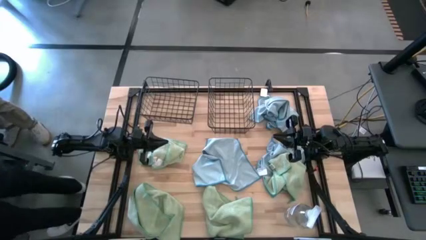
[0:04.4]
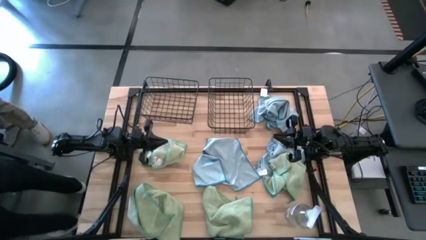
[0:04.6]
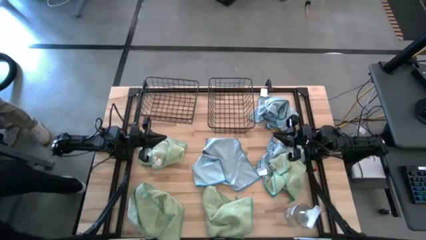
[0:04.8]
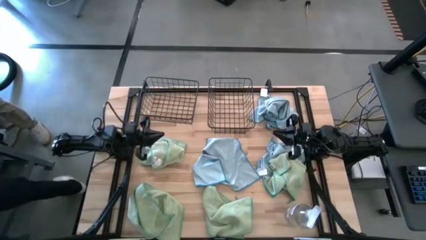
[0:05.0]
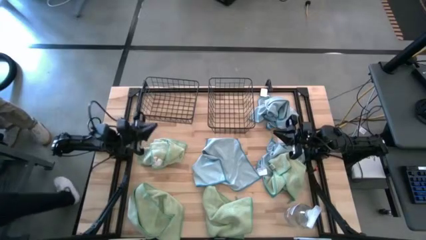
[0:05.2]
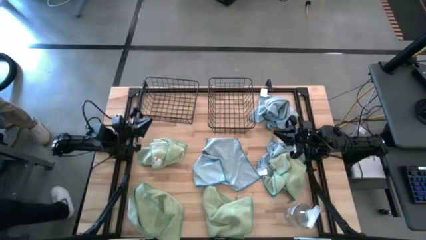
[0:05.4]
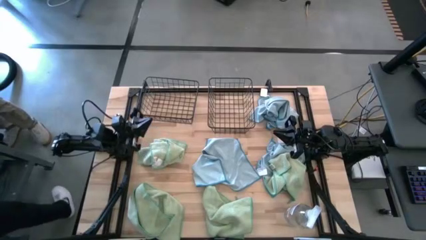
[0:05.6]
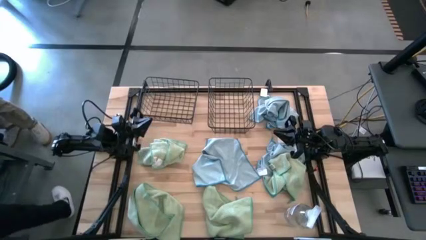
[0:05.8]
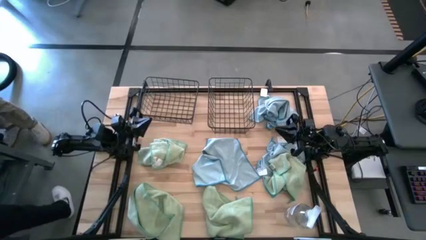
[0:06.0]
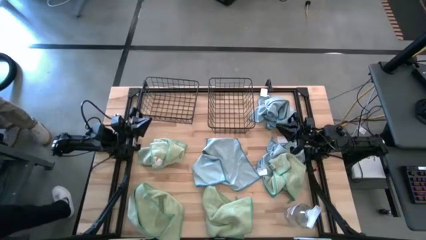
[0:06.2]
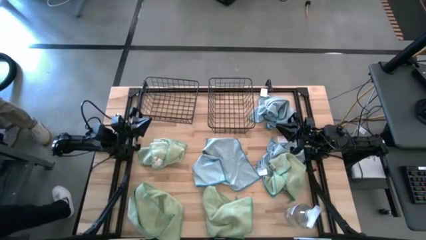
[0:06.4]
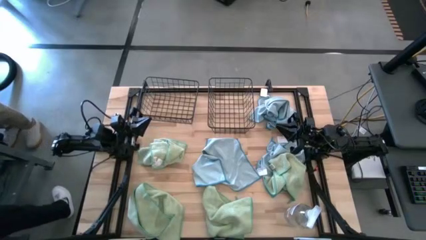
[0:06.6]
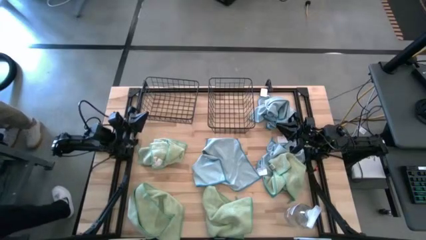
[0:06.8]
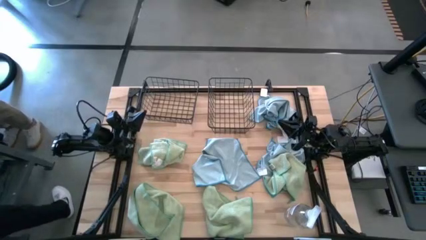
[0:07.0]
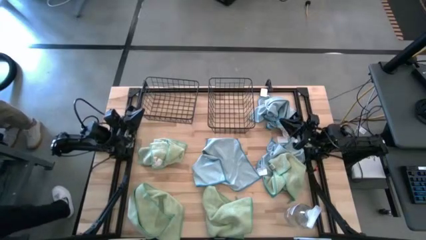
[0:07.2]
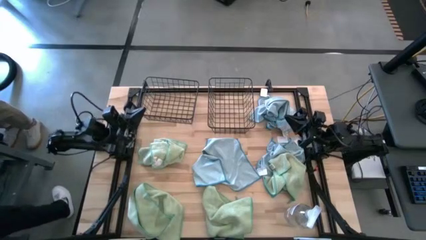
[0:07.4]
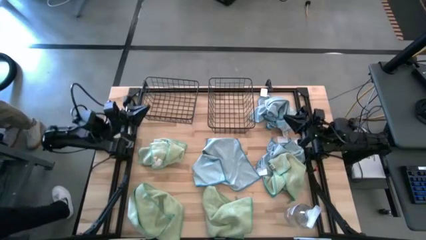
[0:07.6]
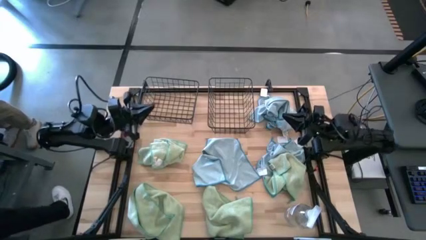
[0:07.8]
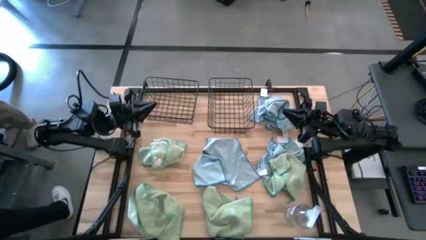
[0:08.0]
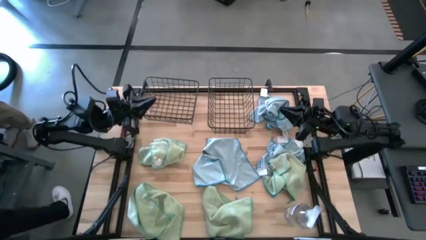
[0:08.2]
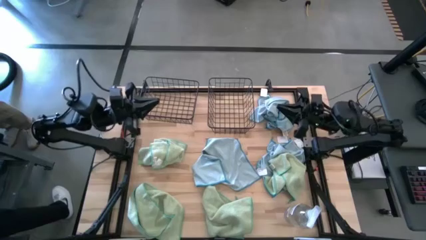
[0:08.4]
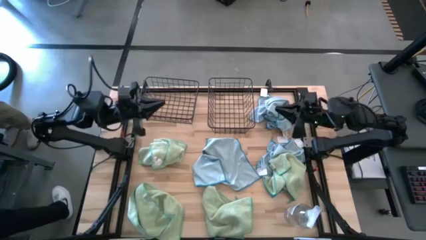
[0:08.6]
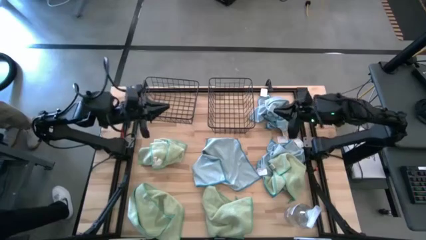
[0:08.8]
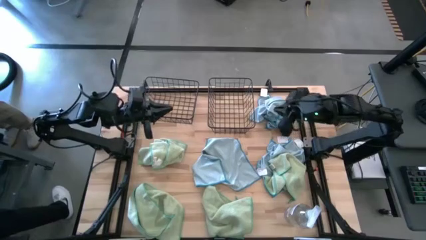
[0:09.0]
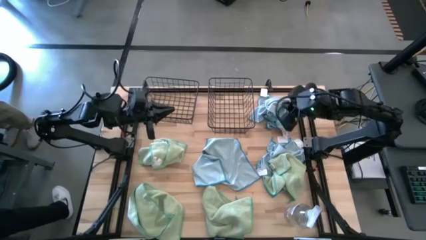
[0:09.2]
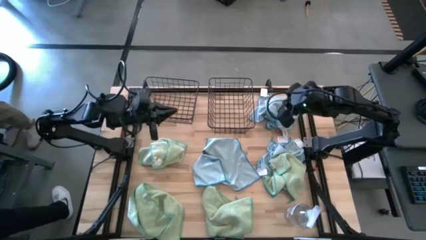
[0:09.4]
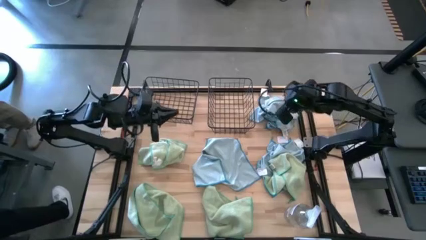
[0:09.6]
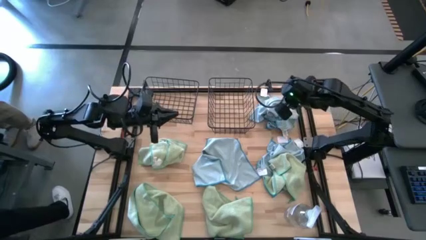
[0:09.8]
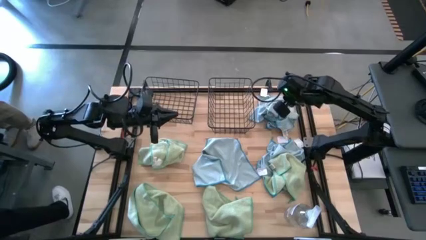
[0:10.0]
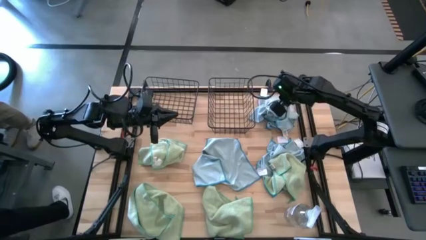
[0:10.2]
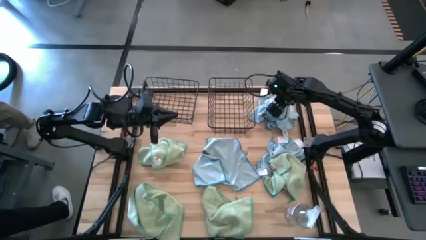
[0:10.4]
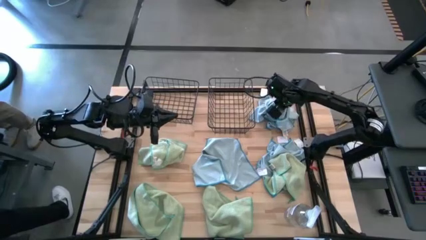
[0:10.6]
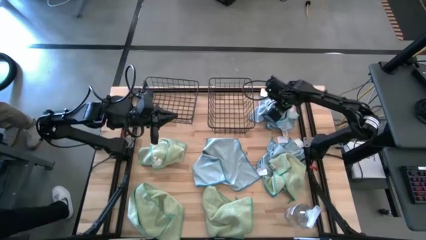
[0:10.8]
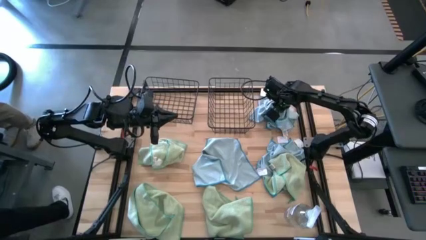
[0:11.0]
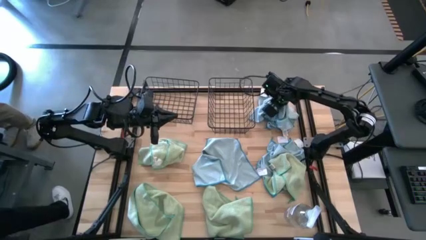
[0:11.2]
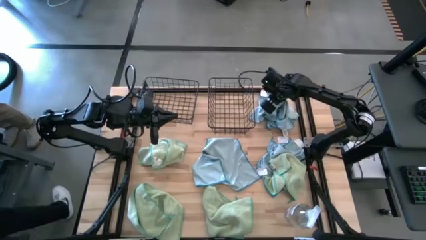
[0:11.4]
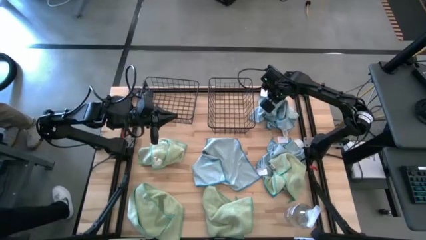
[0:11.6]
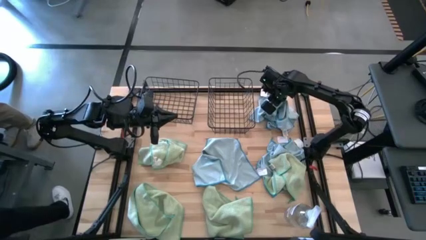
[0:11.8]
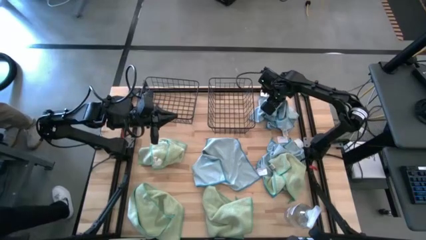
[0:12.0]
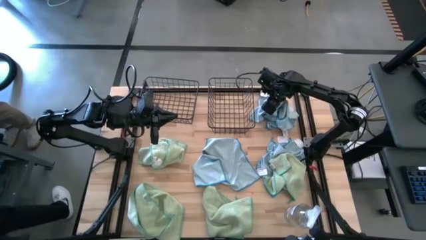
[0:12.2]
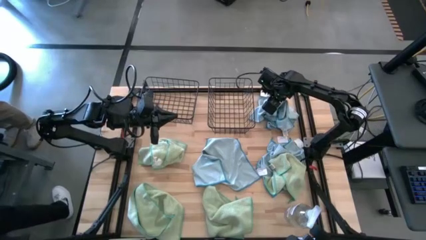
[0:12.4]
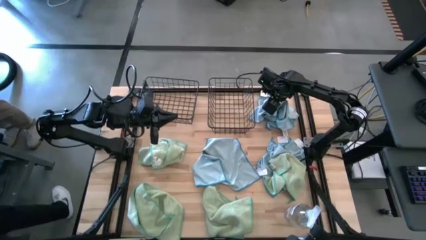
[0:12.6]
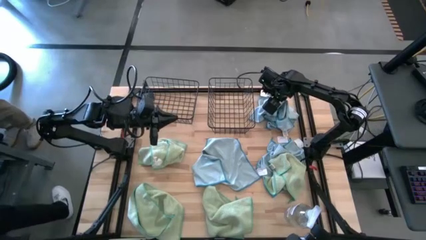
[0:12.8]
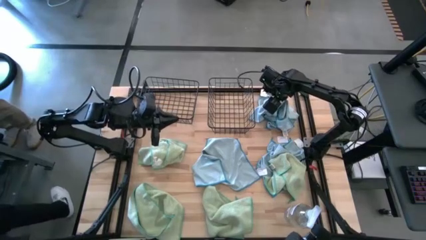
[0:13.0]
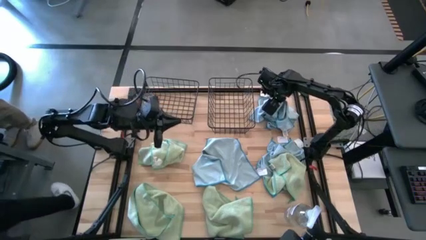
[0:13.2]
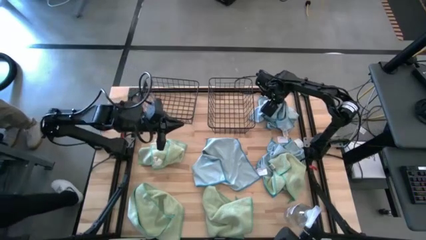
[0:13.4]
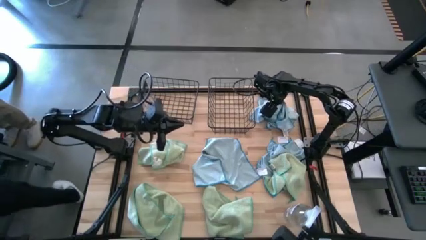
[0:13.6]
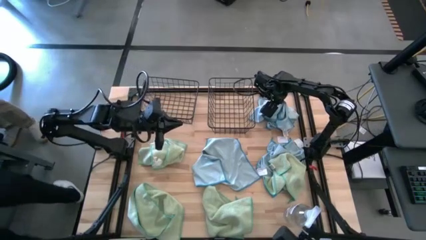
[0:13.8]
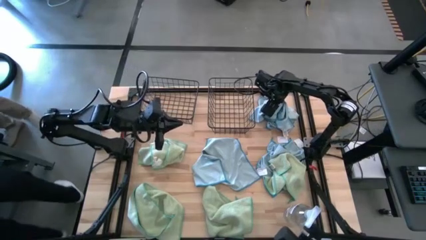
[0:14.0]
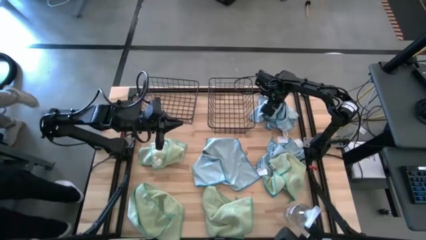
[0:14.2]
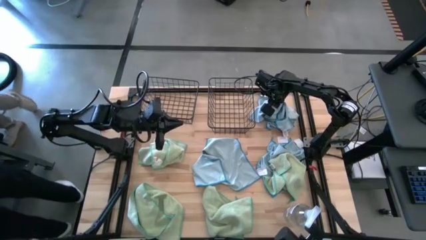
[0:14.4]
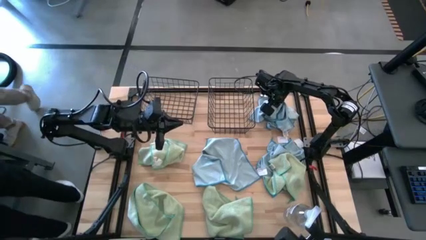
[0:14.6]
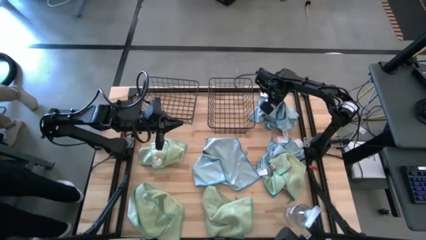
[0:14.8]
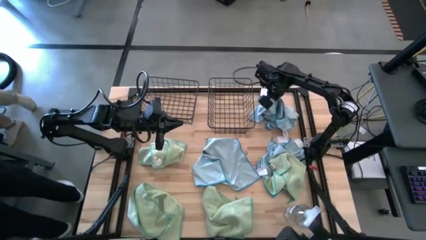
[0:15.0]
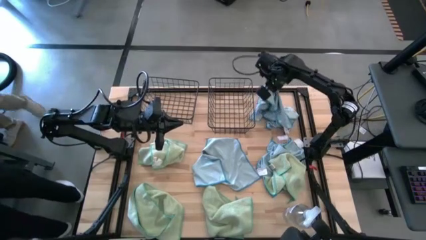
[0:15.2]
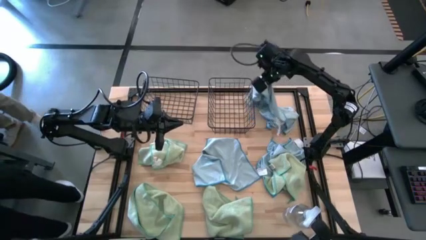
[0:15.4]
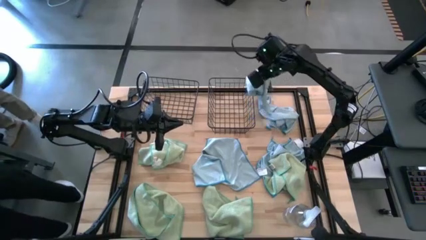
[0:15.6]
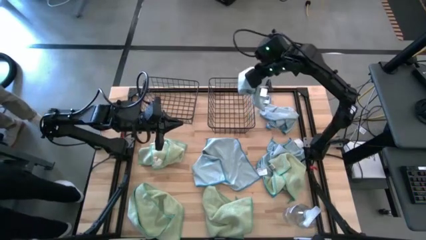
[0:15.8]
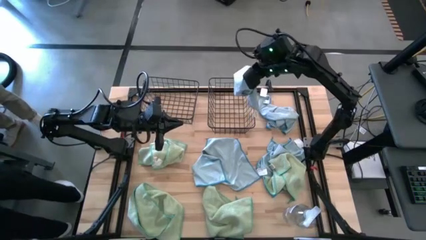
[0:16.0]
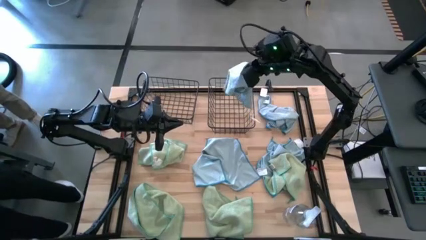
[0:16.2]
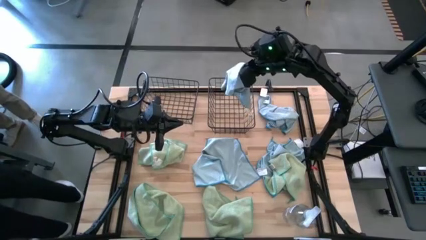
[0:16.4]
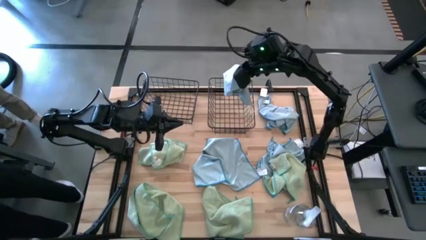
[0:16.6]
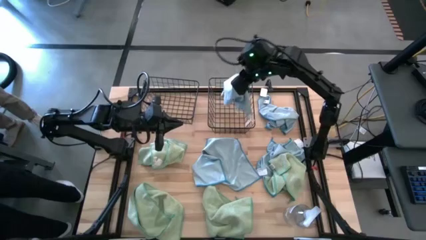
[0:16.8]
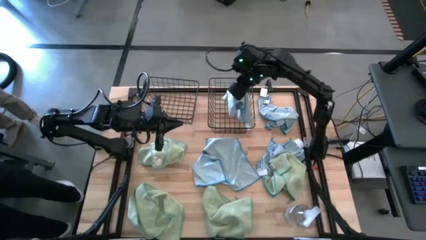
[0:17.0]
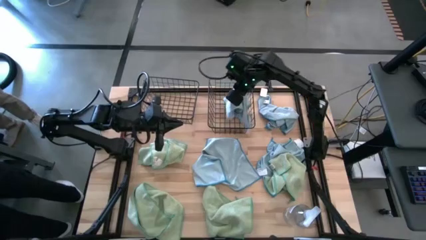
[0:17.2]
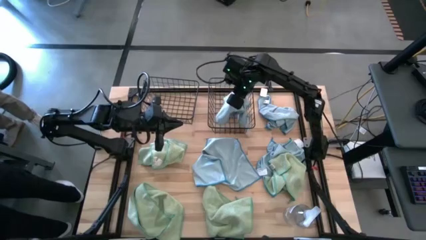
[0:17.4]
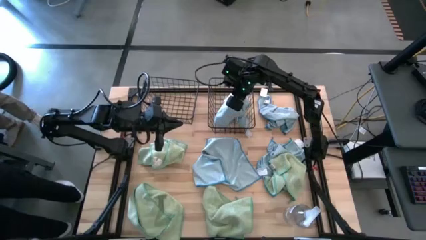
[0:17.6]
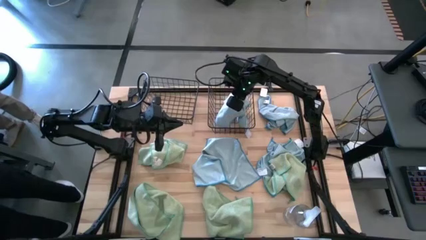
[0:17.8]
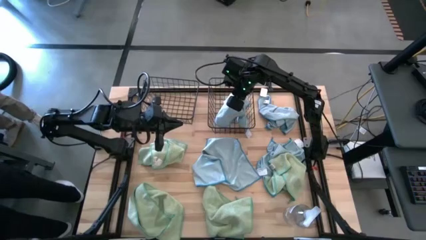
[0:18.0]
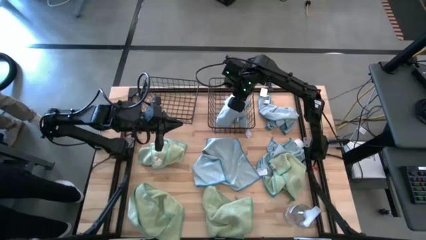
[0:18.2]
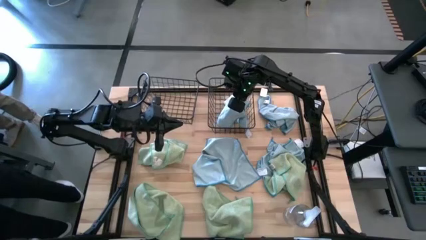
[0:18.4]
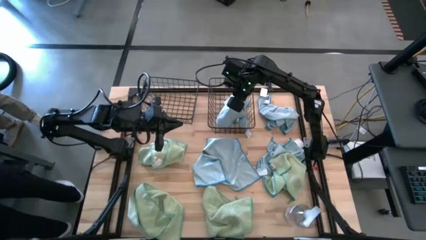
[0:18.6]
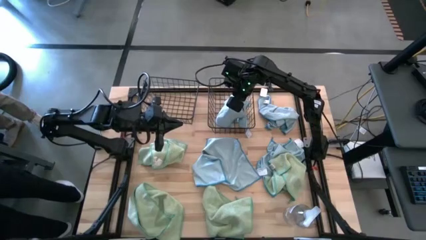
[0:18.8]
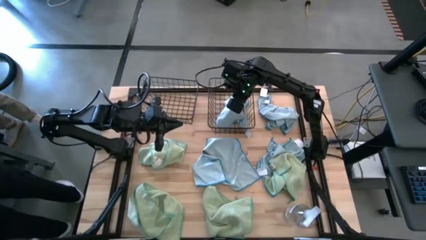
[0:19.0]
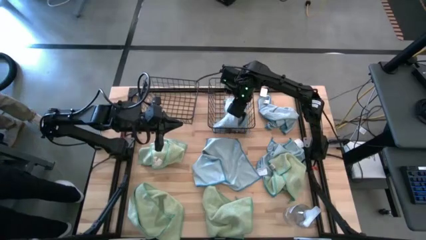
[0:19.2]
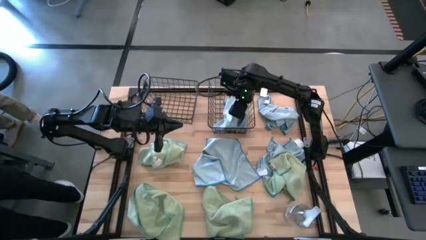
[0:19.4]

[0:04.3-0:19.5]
Task: Sort microfiber towel by color & place in baskets
Put the blue towel into the right wire basket

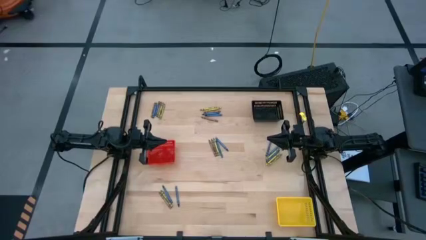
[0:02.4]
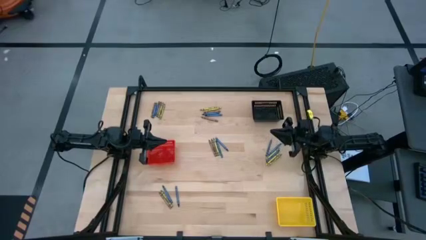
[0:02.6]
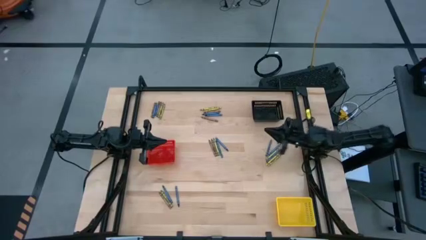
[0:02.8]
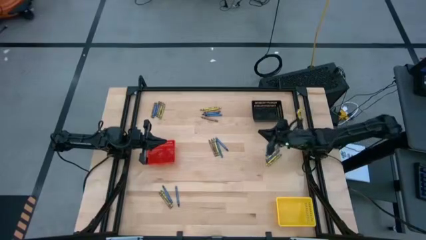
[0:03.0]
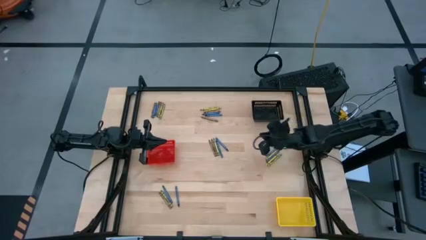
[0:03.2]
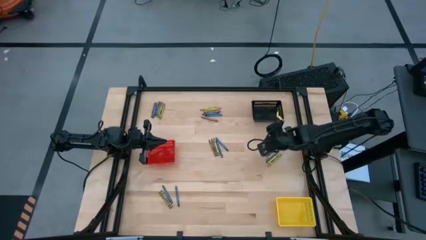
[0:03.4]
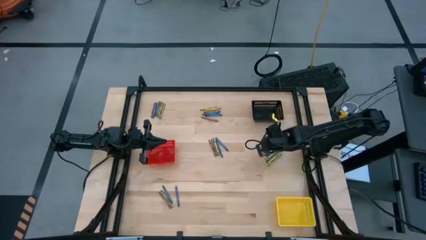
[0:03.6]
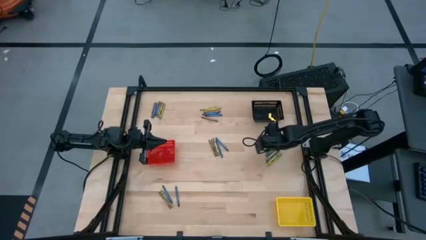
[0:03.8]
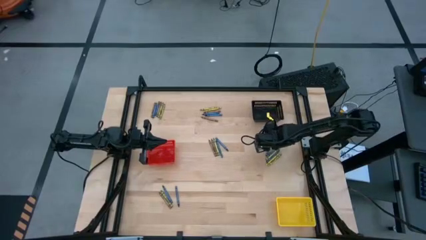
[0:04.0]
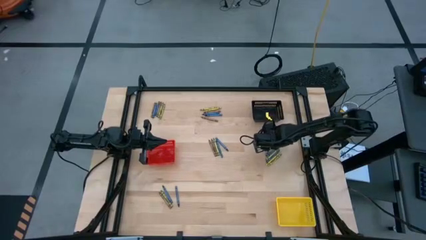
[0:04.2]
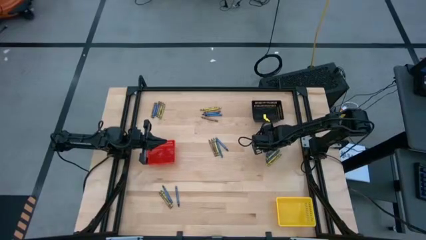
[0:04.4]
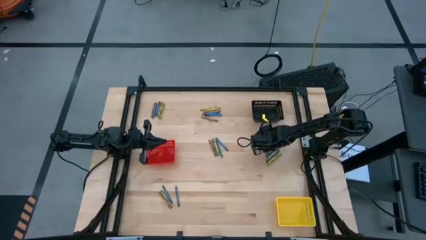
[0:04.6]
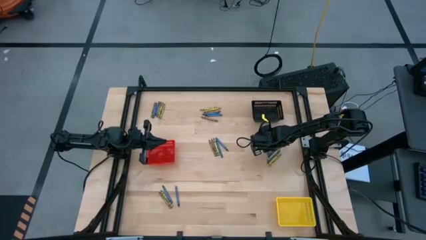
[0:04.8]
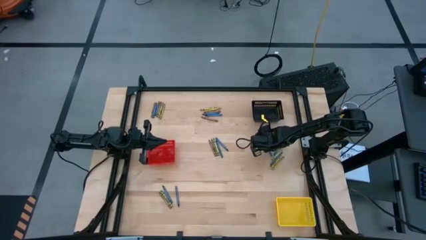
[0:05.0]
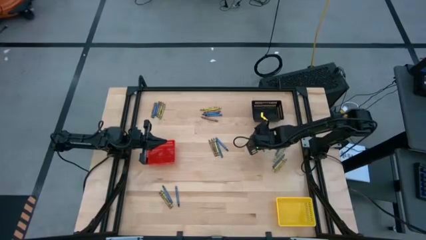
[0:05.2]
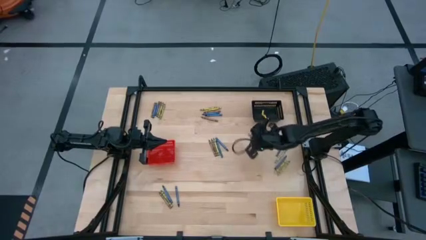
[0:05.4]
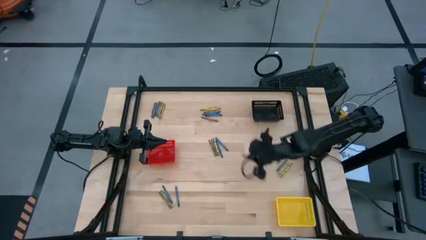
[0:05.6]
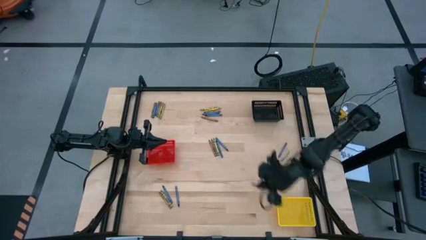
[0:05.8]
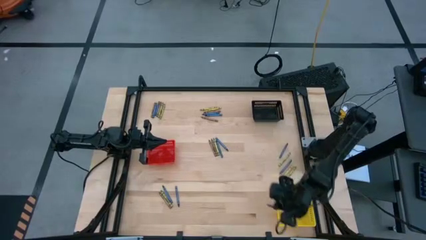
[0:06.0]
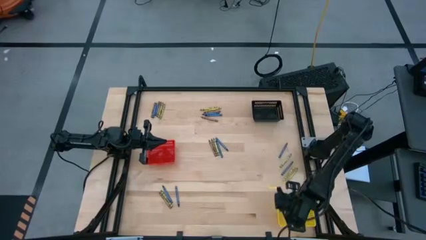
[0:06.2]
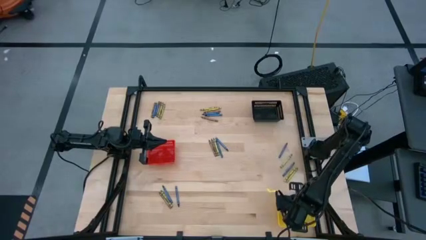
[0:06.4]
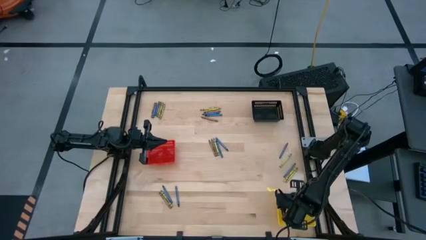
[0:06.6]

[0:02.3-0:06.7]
Task: Sort crayons
Put the blue crayon into the yellow bin
